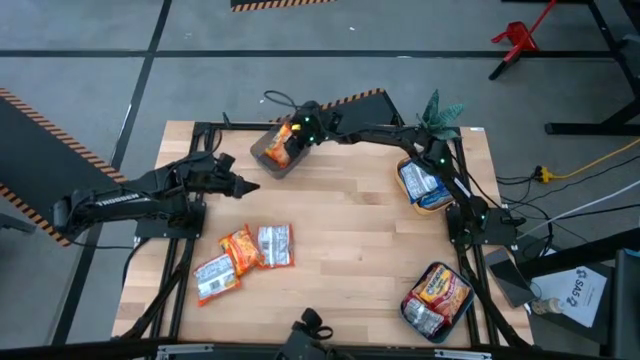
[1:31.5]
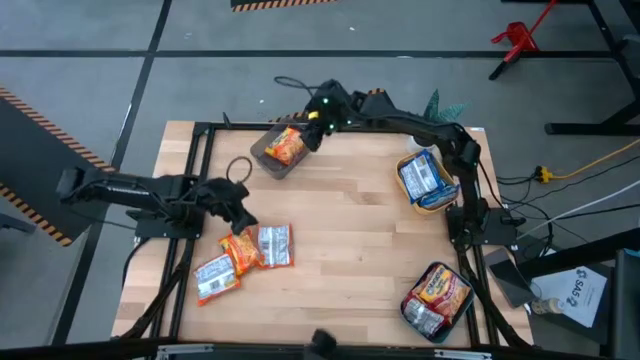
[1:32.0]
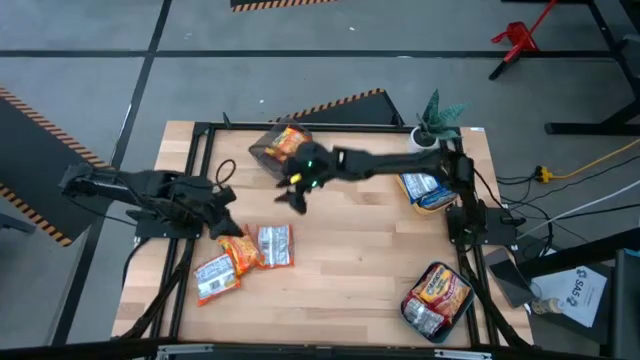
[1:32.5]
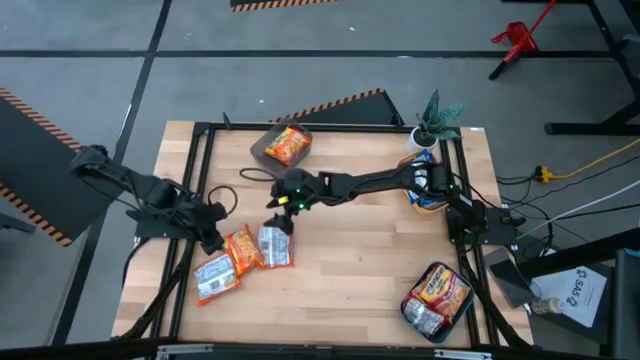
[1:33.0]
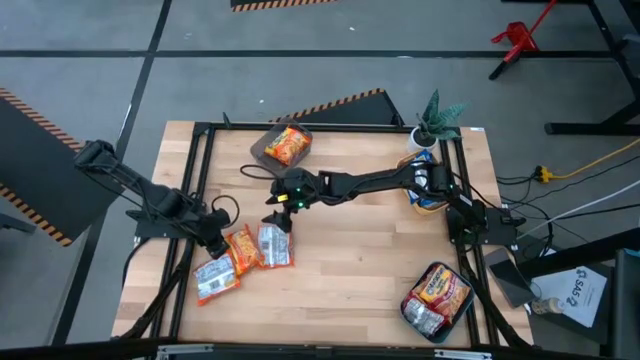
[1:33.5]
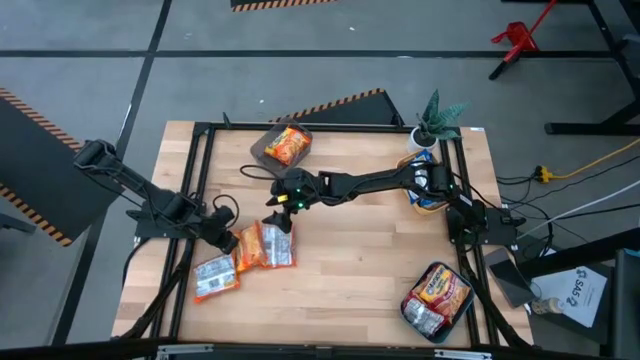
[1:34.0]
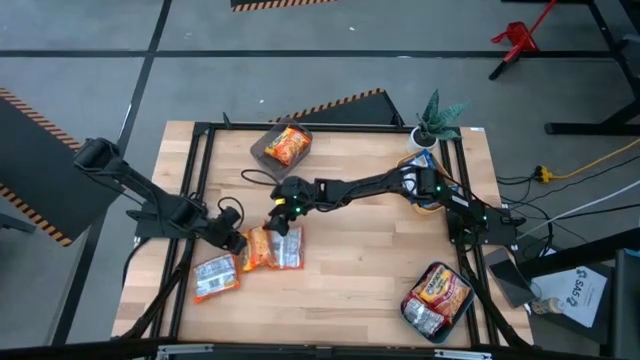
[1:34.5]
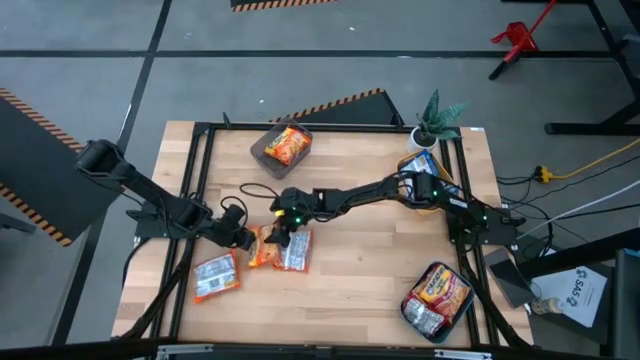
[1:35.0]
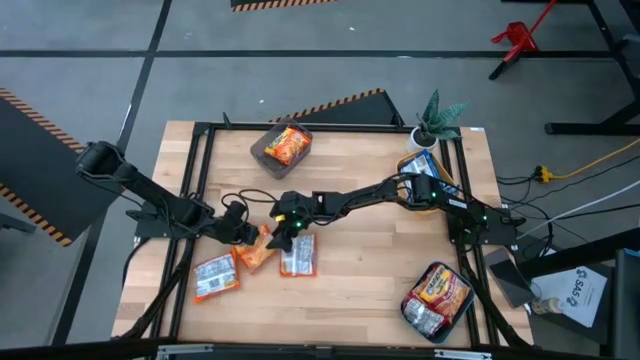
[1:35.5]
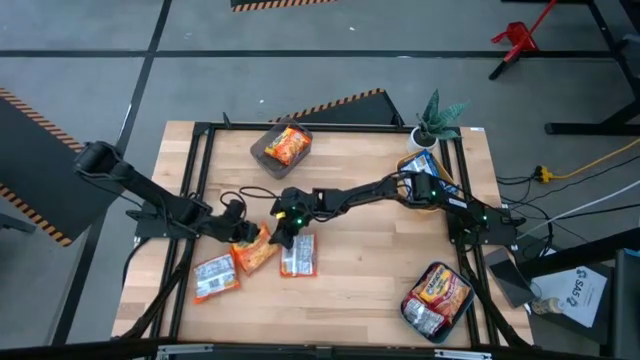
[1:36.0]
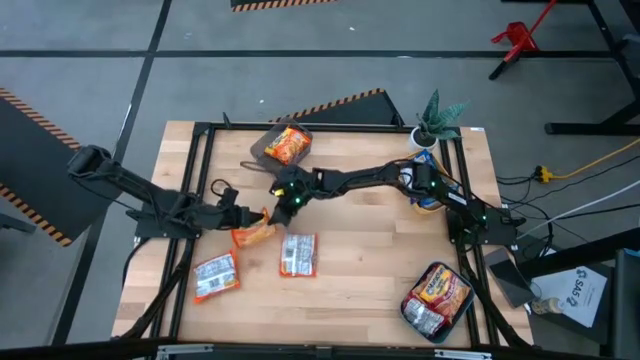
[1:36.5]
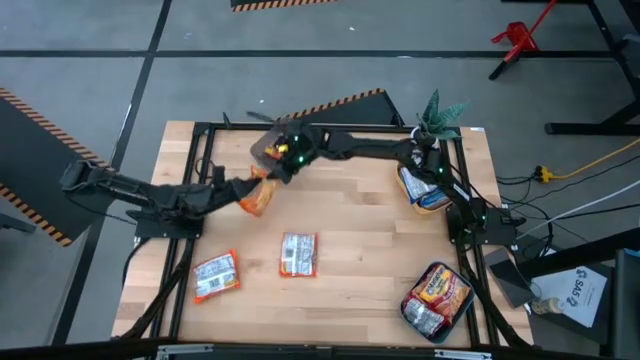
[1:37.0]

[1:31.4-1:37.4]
Task: Sort Maruchan noodles
Put the orange noodle pack into the gray bin

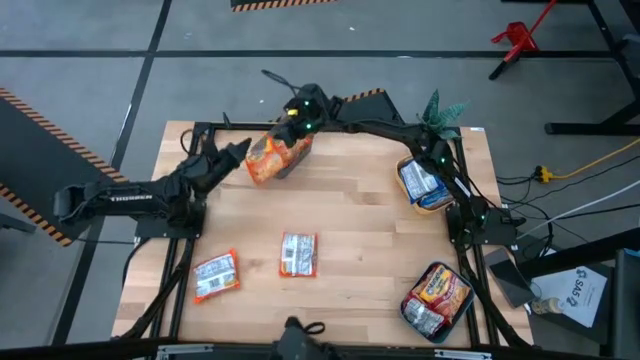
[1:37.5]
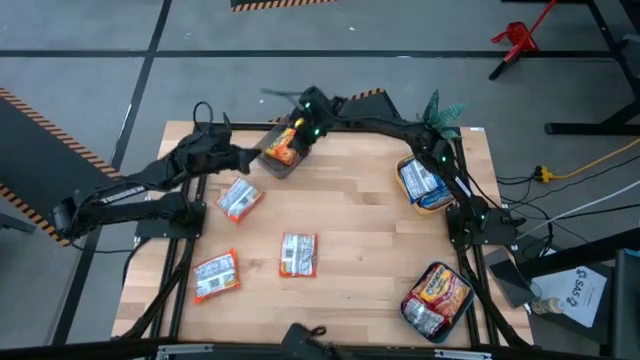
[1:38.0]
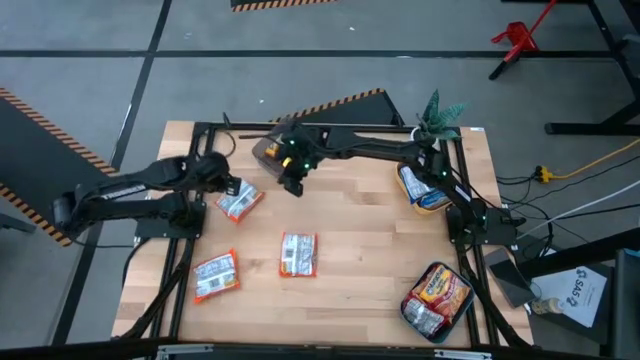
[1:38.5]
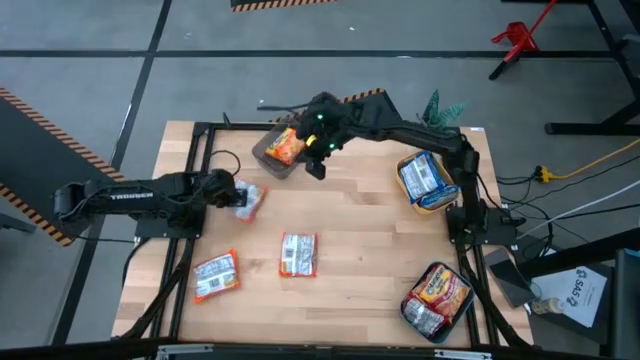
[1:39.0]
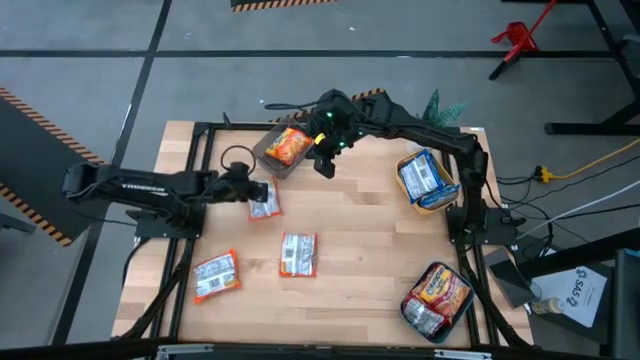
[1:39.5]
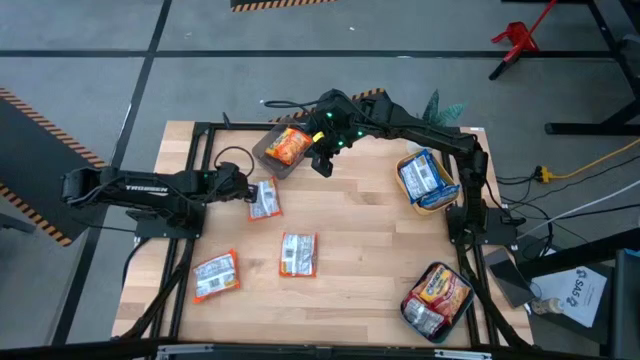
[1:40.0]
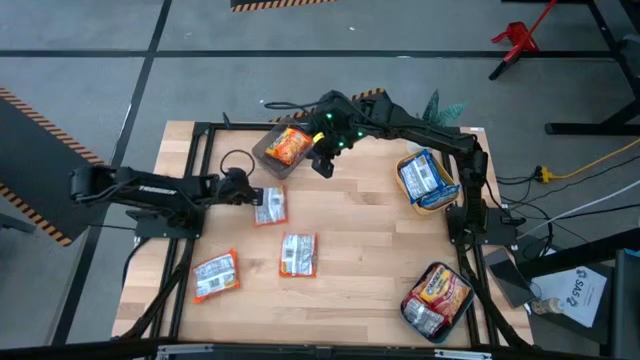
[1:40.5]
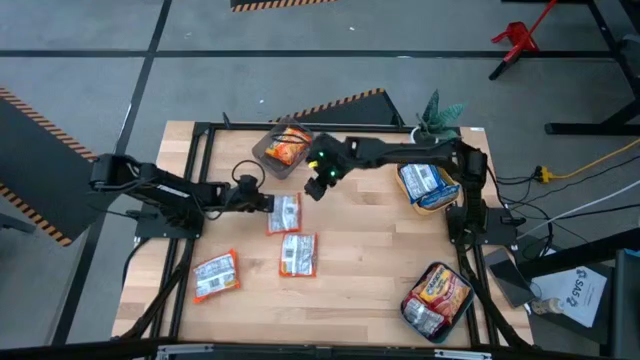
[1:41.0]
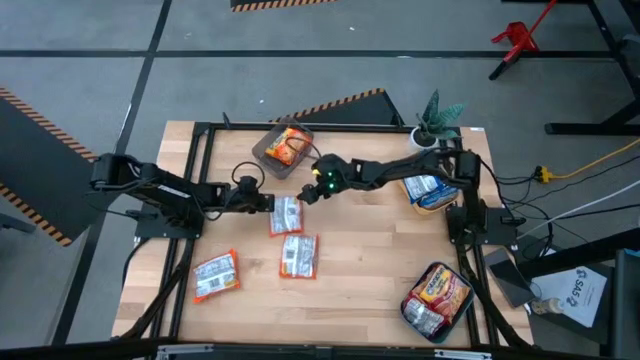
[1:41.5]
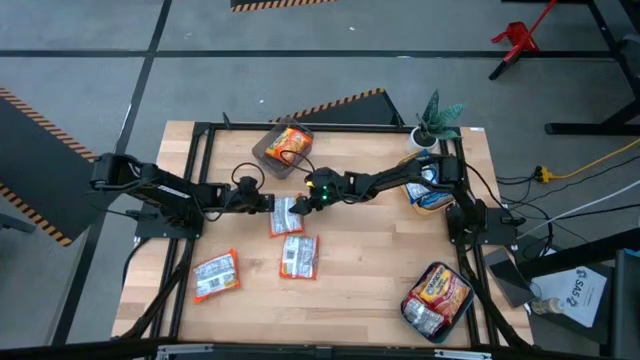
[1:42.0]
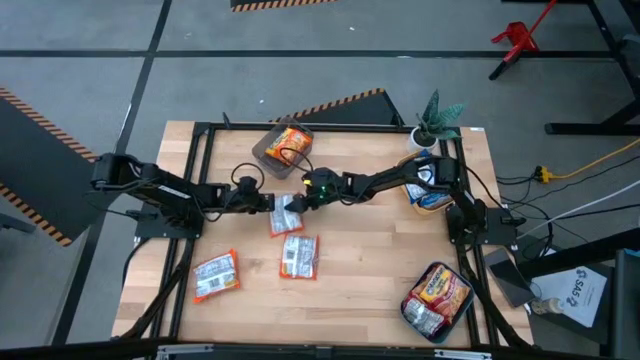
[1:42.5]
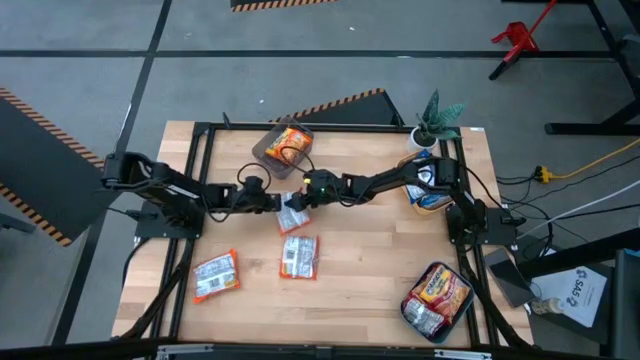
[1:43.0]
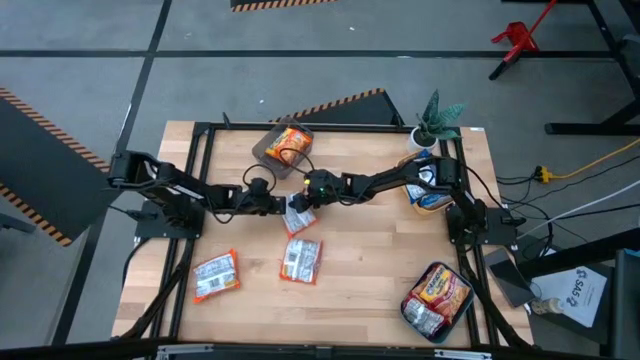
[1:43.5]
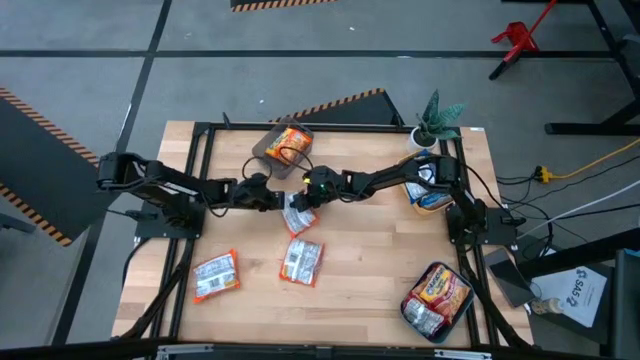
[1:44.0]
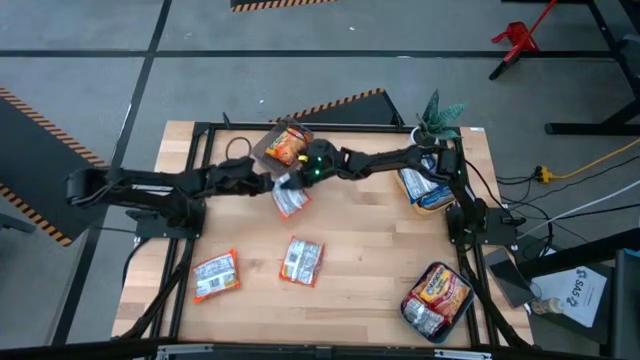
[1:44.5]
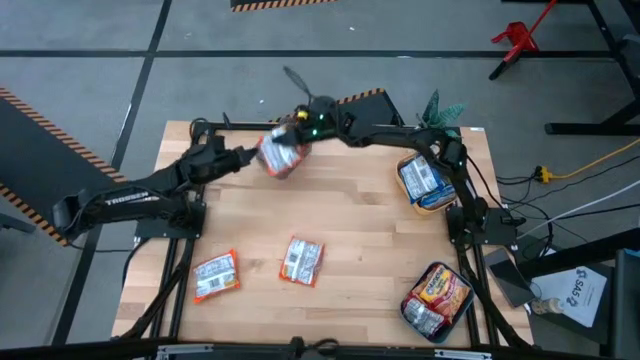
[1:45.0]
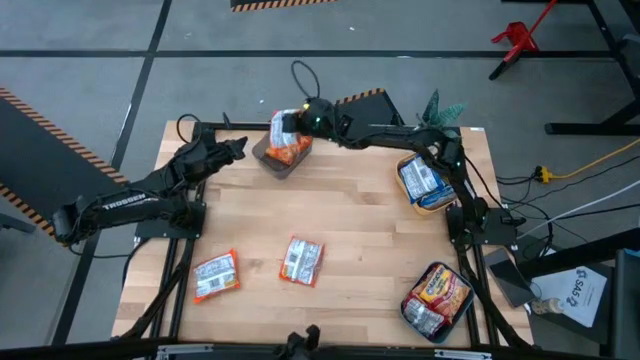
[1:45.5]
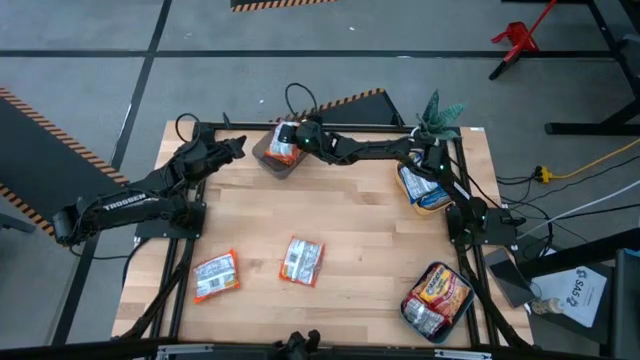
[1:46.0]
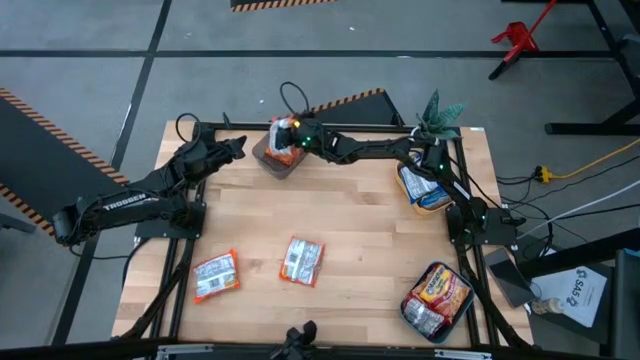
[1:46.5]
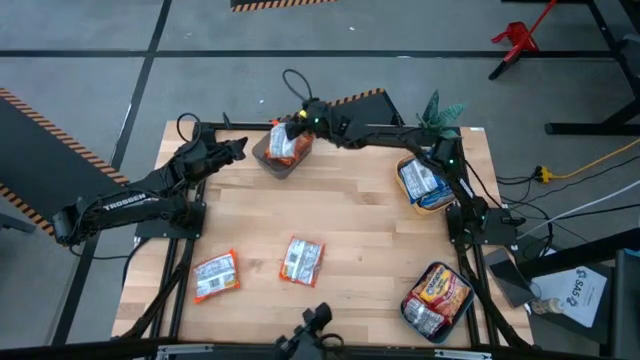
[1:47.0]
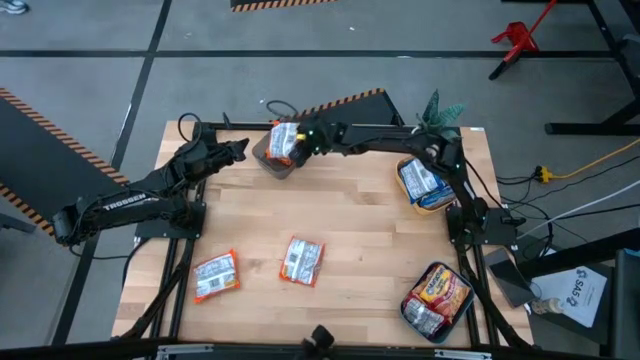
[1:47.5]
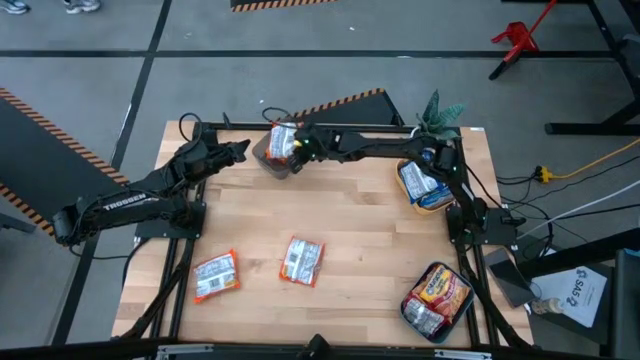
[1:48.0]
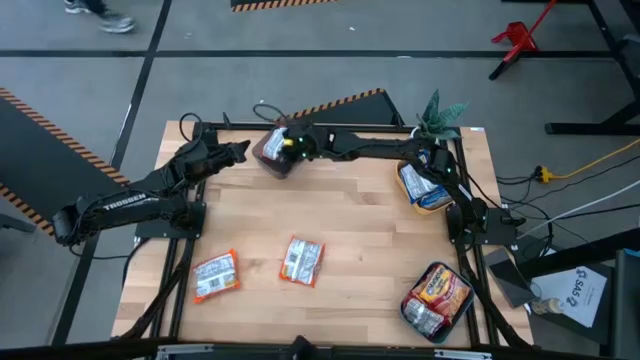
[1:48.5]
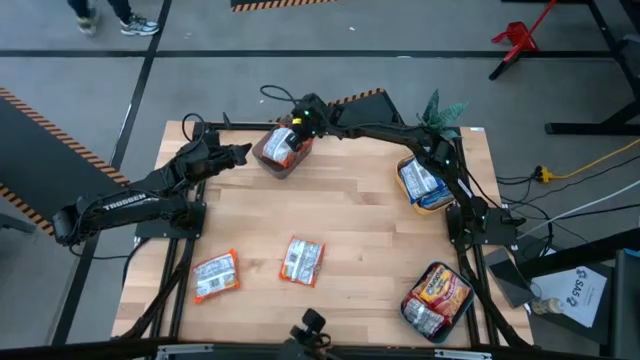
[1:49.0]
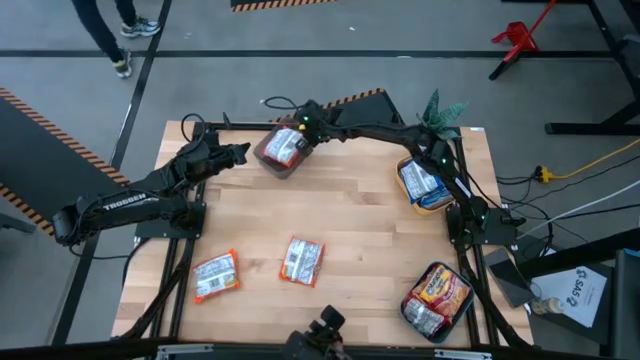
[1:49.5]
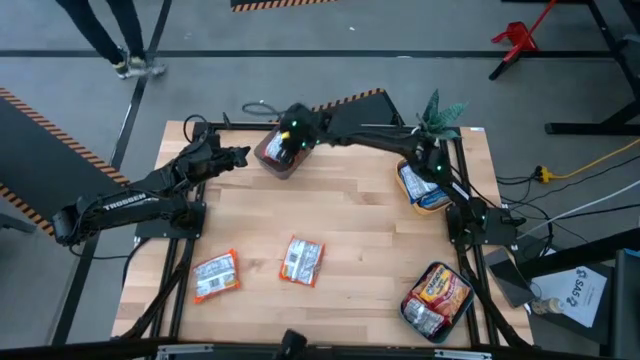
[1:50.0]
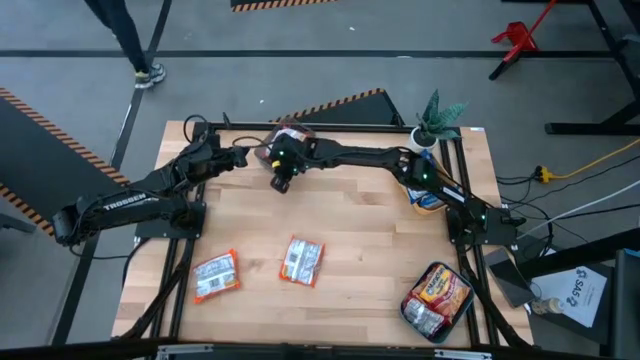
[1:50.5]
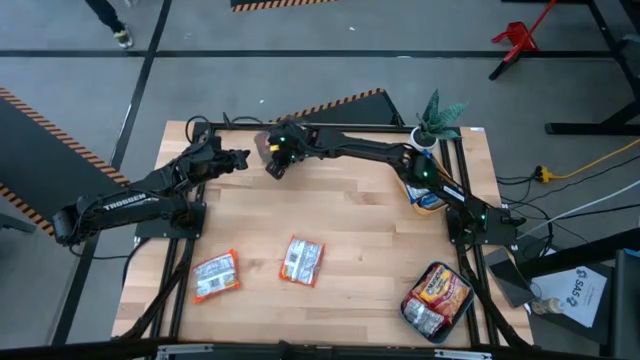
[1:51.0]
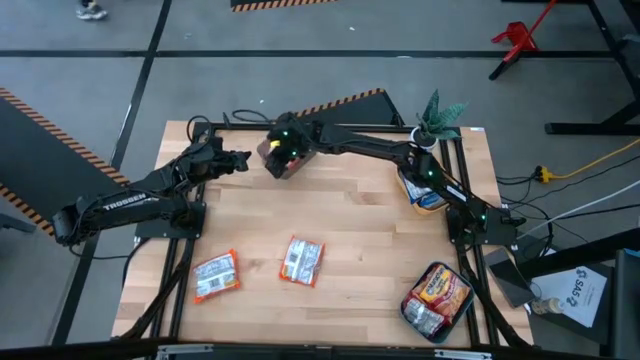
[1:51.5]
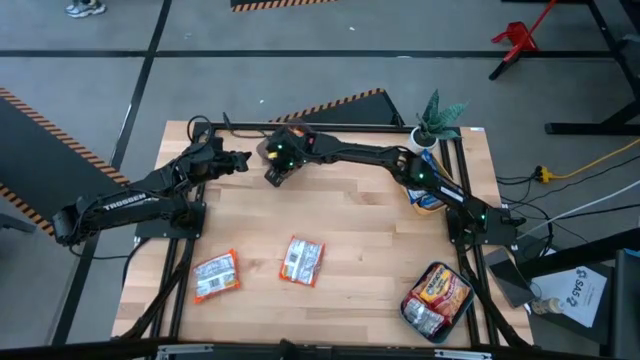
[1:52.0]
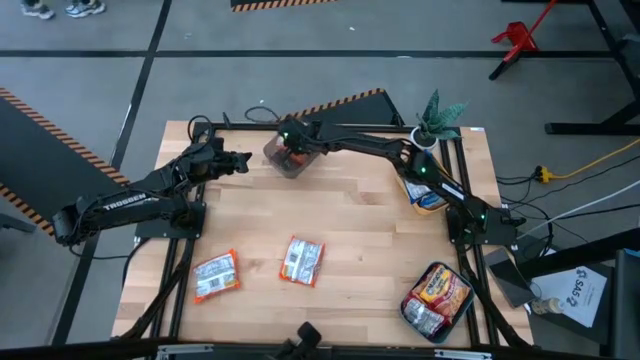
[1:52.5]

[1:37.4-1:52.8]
Put the orange noodle pack into the gray bin
